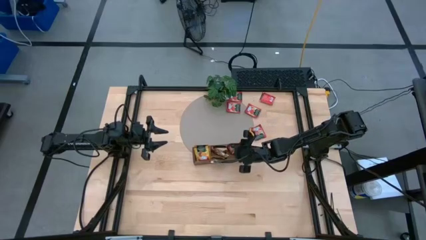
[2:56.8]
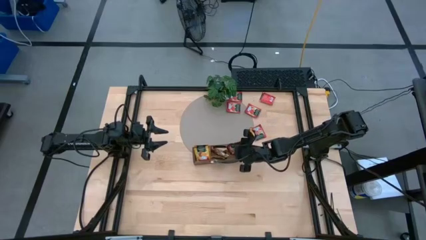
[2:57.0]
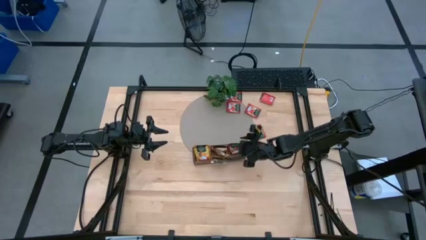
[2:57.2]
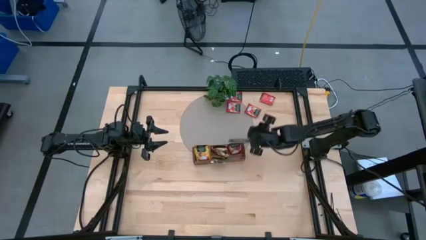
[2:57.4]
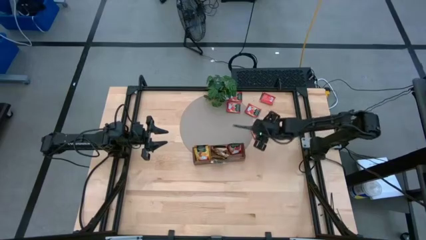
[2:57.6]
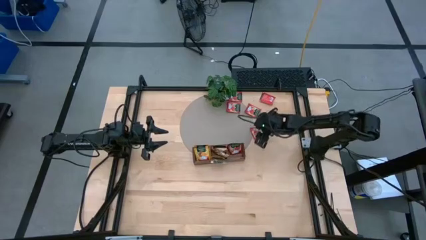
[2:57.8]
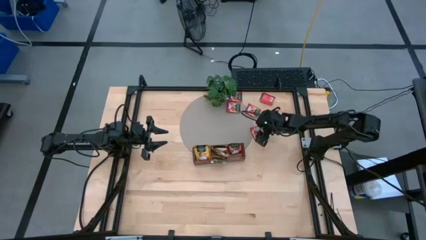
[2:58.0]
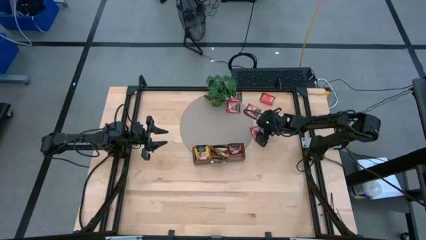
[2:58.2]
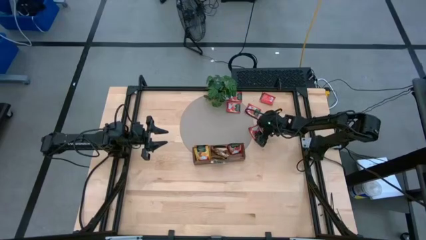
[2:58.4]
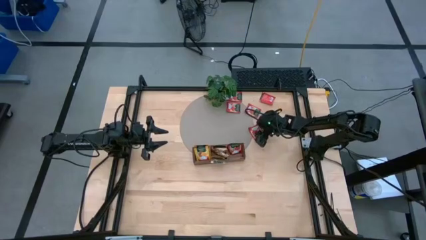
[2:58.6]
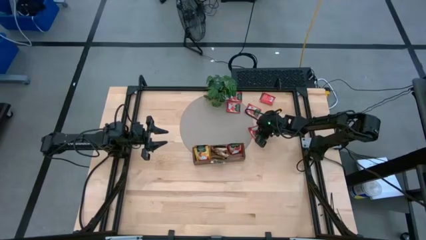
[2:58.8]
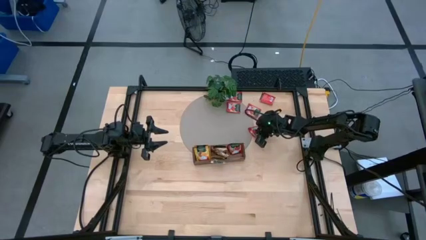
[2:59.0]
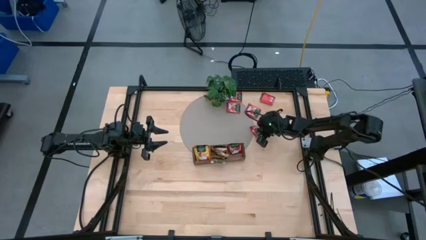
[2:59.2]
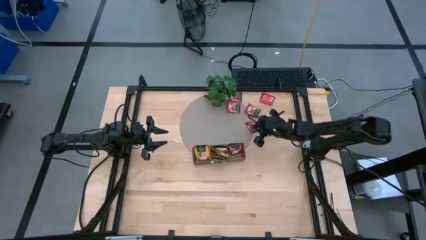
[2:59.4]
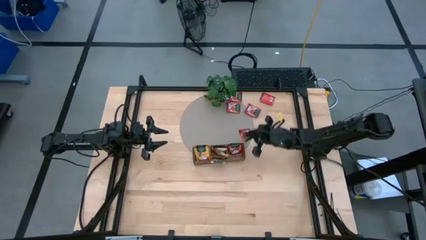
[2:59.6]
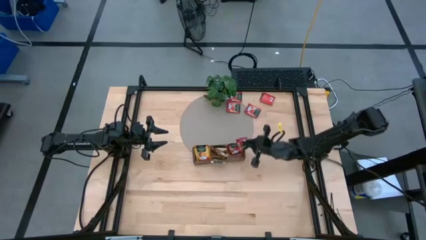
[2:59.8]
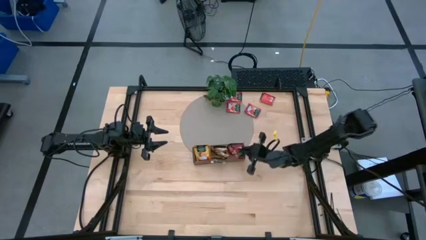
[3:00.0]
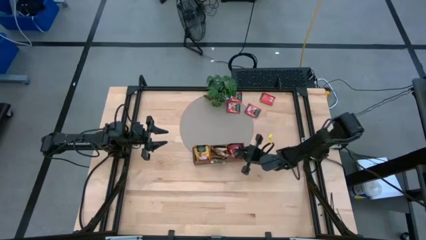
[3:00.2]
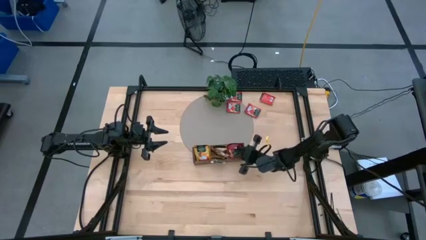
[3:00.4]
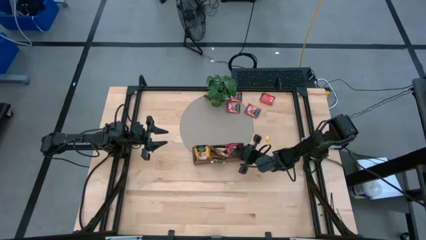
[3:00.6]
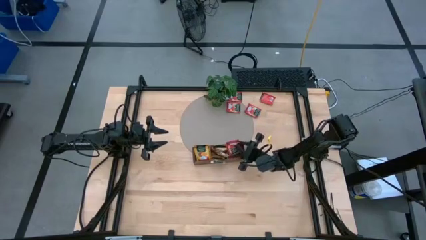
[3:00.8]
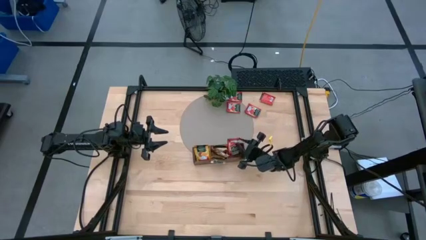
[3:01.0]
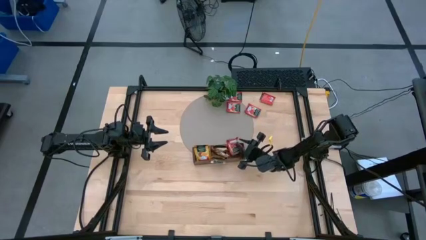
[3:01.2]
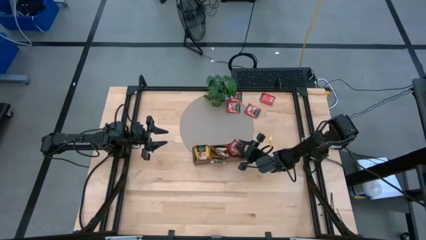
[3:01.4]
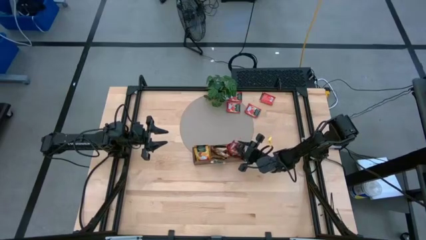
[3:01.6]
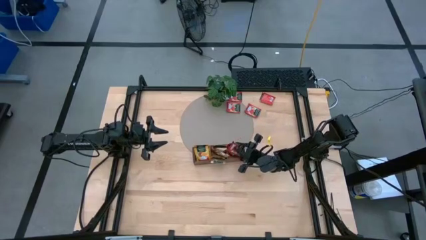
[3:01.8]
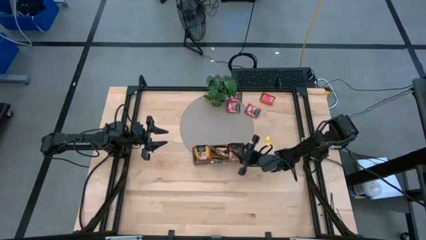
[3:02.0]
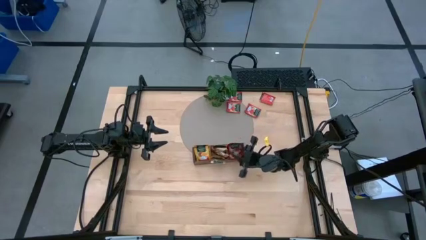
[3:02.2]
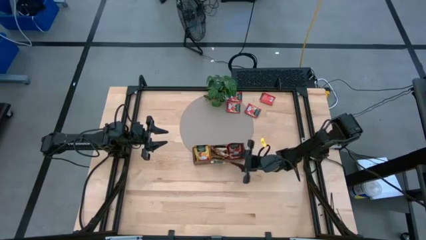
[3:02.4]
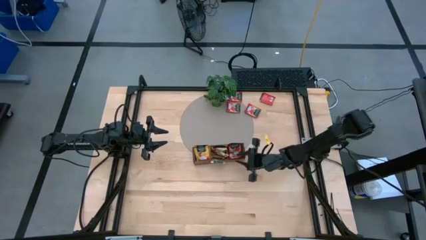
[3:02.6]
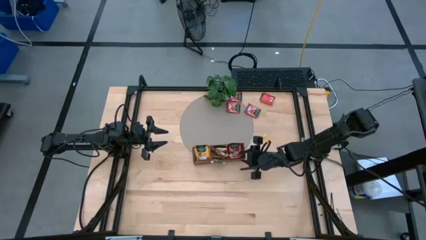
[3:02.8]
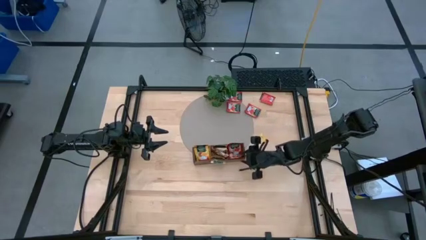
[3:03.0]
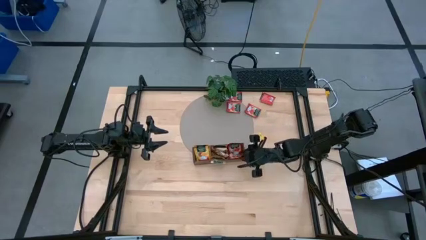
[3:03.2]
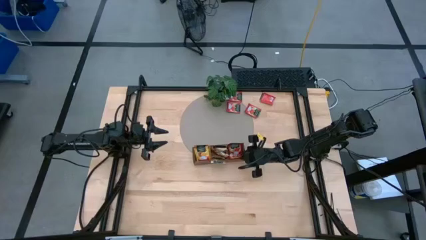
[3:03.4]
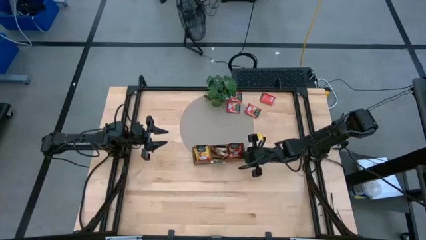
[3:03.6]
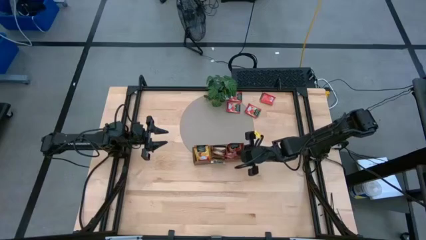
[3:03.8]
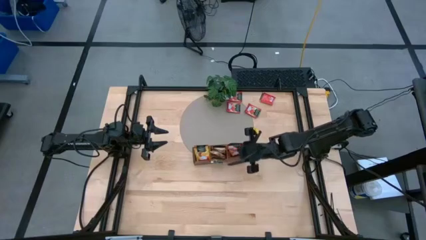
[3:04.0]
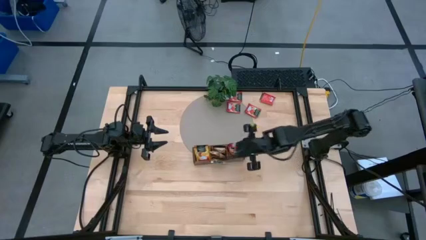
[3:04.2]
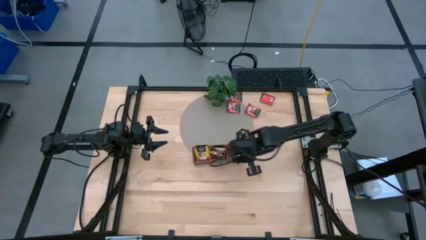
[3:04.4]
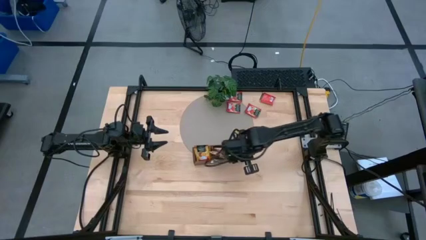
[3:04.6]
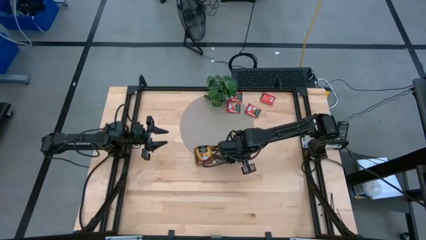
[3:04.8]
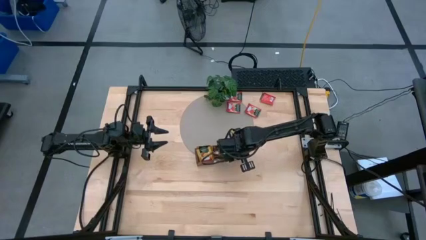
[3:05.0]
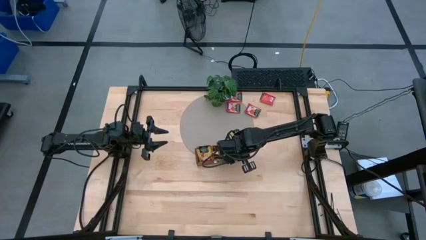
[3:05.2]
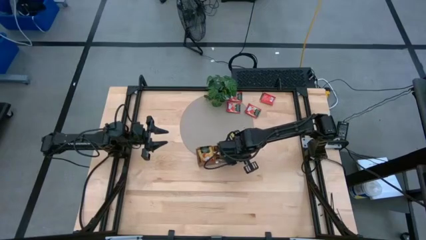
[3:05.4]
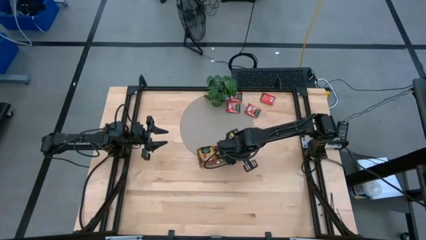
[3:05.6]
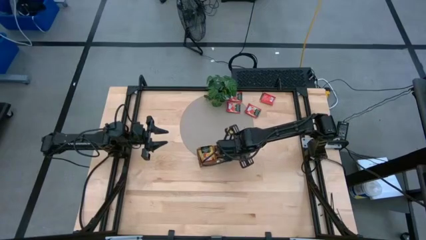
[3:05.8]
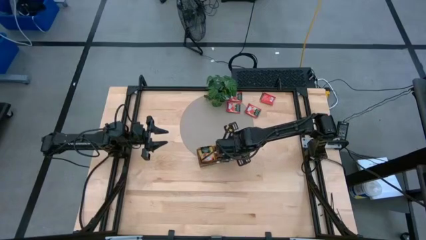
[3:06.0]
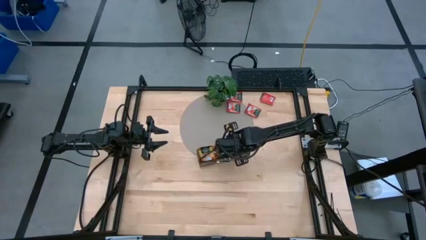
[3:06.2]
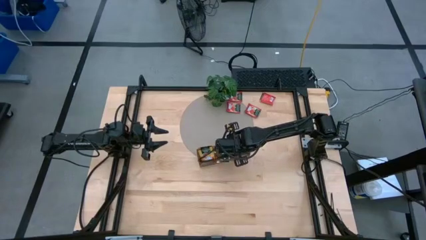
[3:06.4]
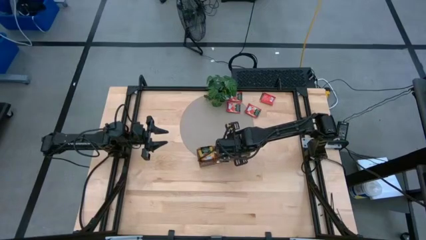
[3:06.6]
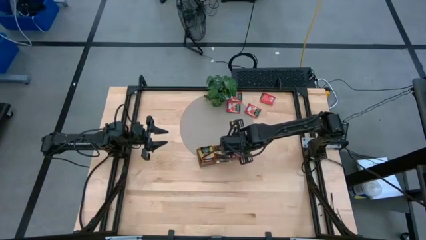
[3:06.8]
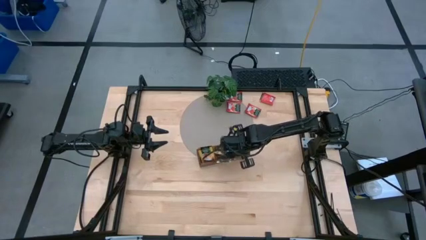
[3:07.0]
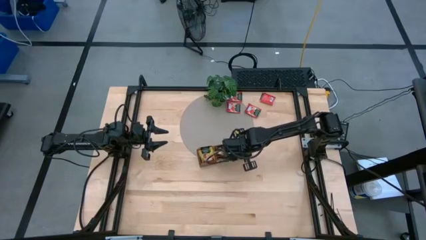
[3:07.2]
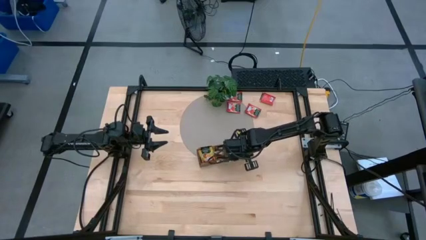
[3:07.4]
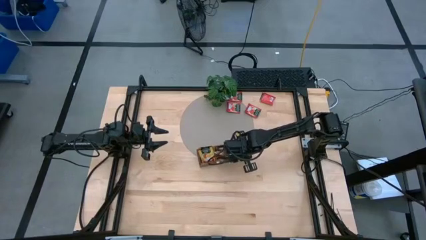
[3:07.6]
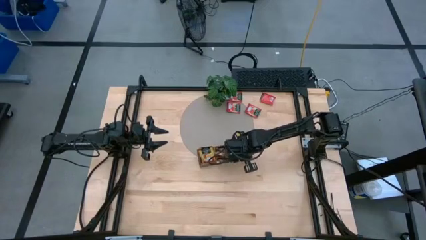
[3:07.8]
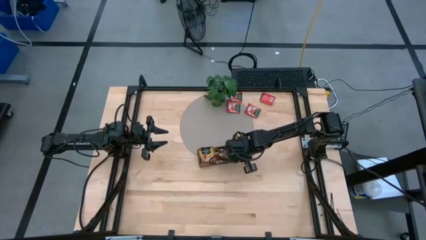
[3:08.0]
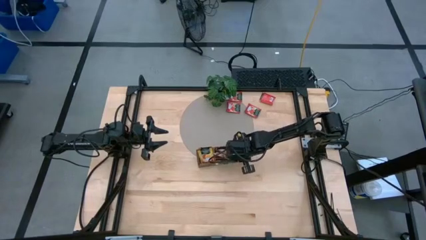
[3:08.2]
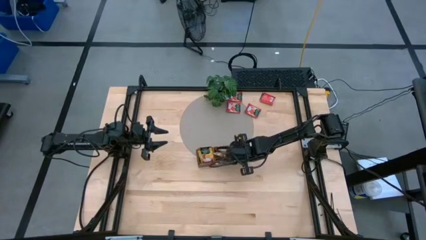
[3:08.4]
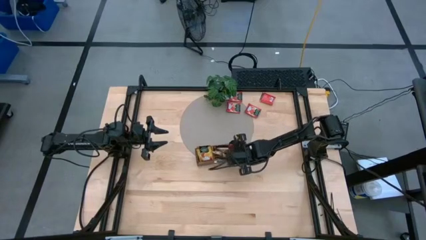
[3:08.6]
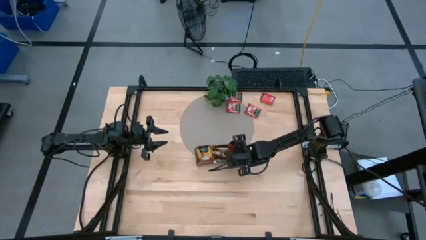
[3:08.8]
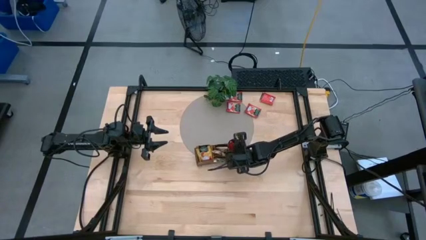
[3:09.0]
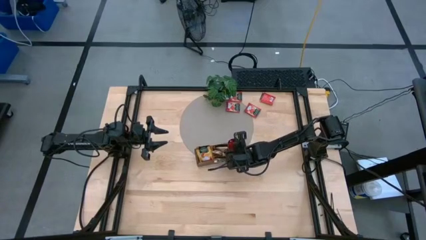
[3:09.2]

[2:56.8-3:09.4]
Task: Pick & Place Tea
Put the red tea bag into the right slot of the wooden organizer

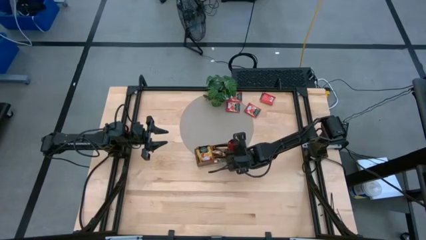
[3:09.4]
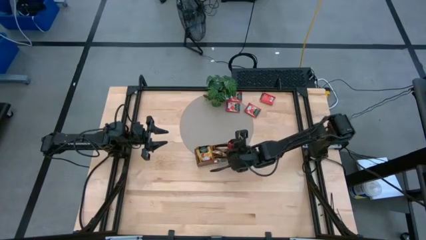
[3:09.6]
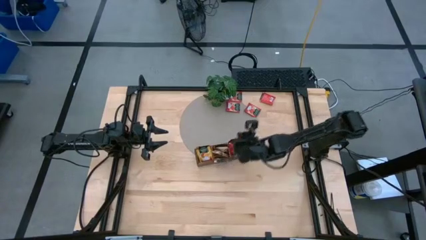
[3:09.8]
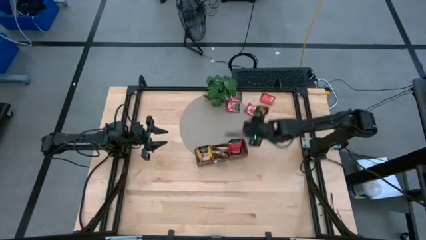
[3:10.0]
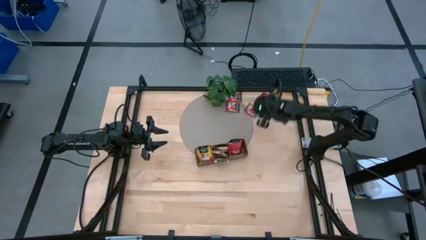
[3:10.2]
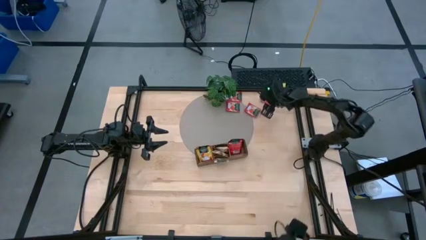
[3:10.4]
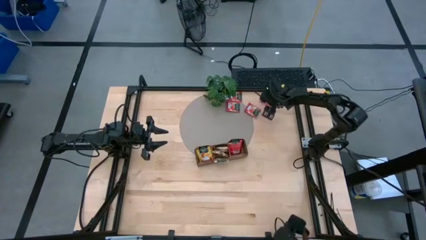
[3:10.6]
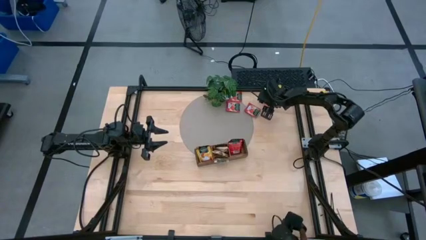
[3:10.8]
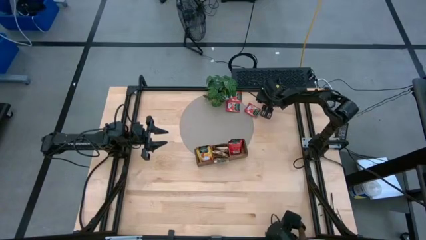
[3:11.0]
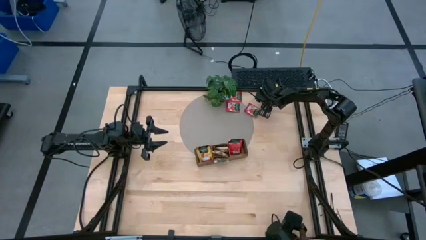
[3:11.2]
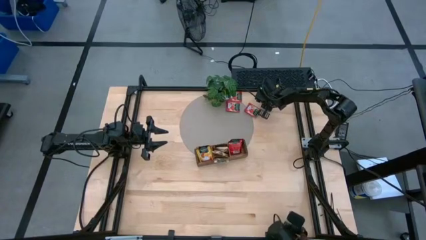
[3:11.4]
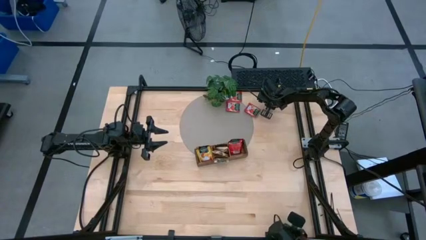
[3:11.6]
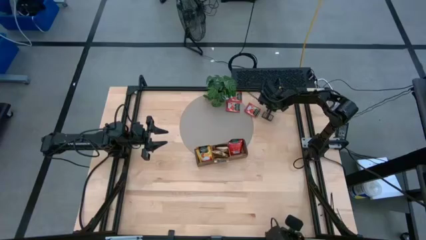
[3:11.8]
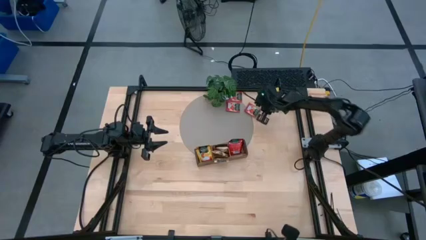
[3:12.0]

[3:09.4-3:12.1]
Put the red tea bag into the right slot of the wooden organizer

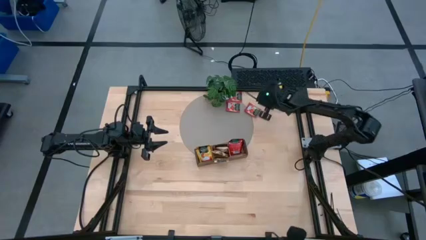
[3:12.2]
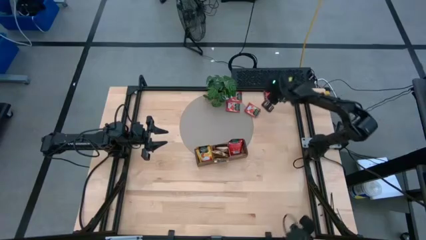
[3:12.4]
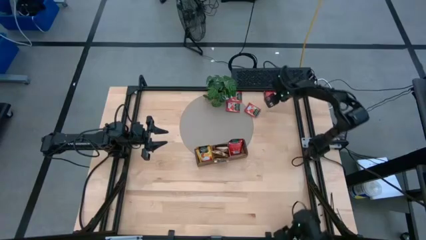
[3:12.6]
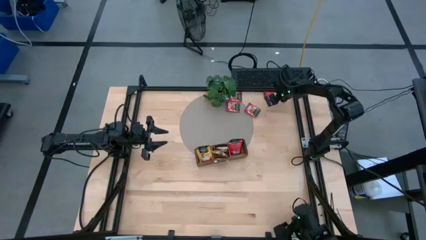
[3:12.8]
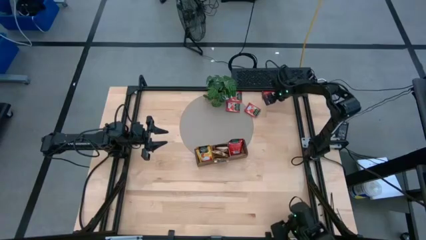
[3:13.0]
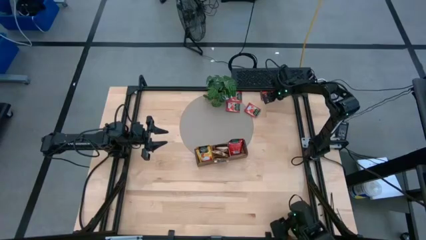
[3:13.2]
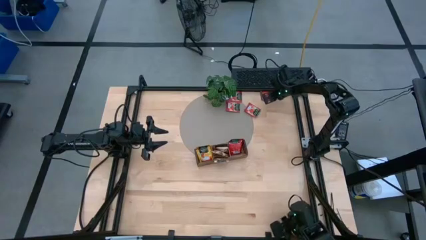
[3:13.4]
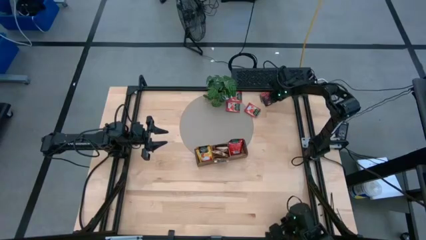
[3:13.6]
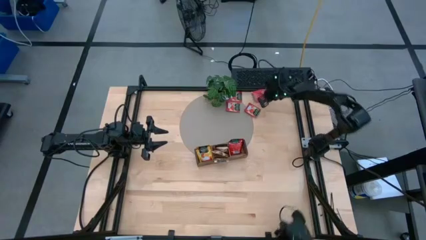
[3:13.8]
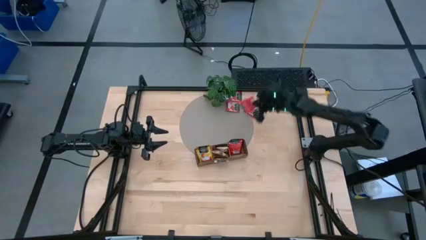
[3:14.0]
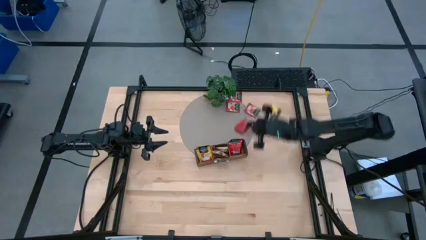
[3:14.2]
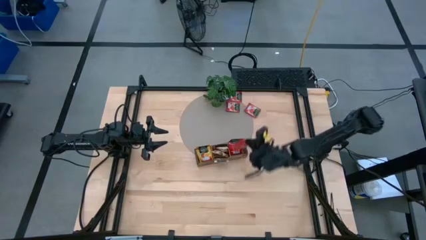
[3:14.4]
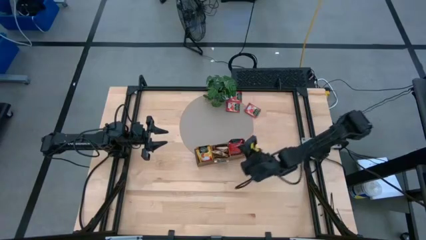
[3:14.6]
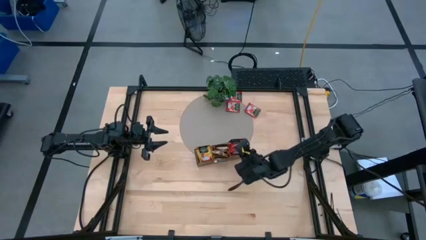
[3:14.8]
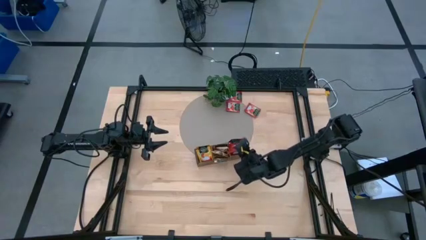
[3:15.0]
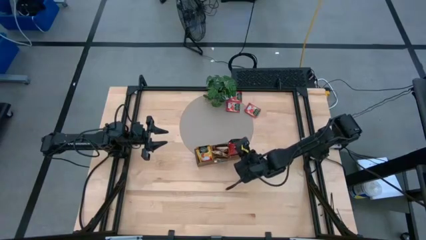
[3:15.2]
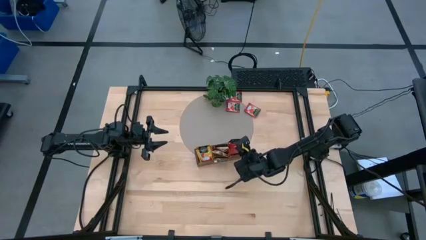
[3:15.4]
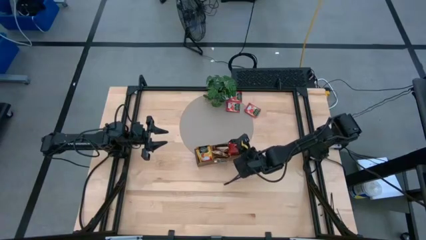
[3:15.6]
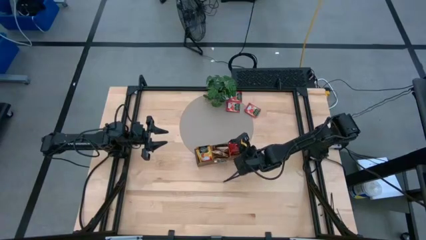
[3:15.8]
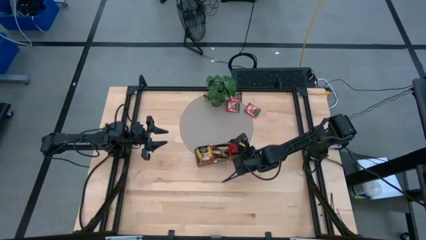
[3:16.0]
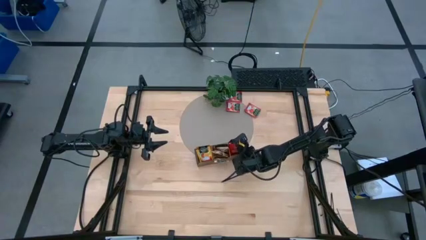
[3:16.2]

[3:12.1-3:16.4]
Put the red tea bag into the right slot of the wooden organizer
